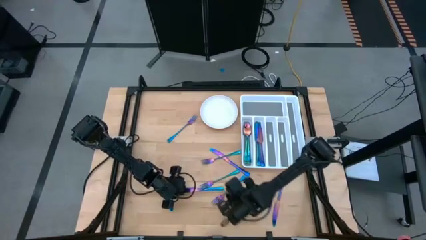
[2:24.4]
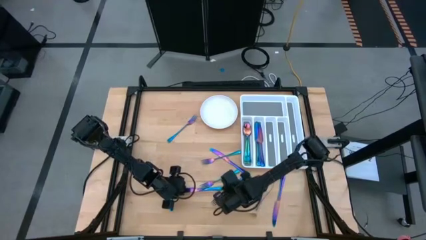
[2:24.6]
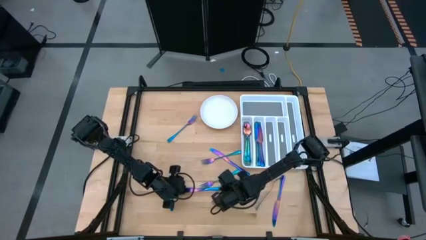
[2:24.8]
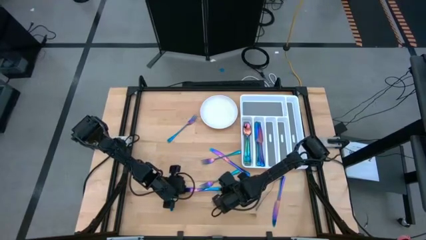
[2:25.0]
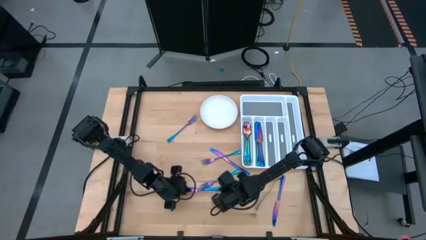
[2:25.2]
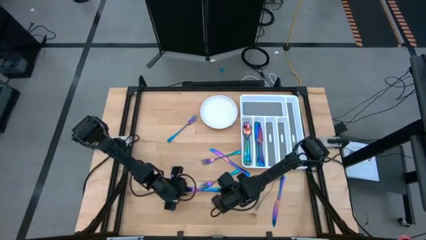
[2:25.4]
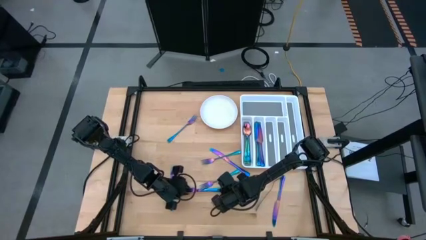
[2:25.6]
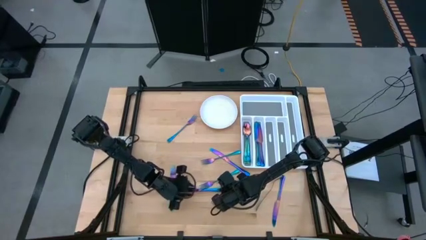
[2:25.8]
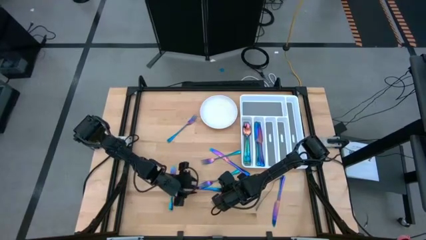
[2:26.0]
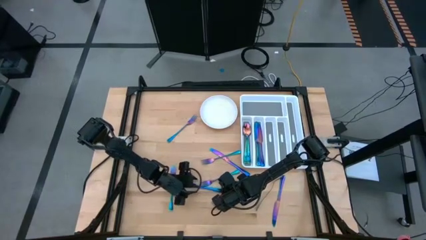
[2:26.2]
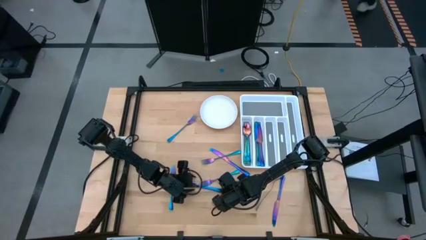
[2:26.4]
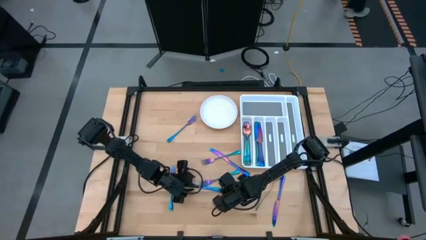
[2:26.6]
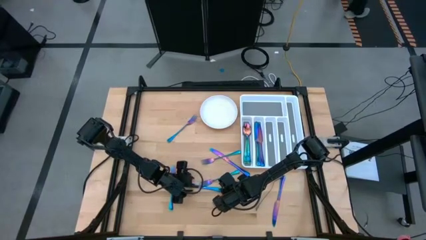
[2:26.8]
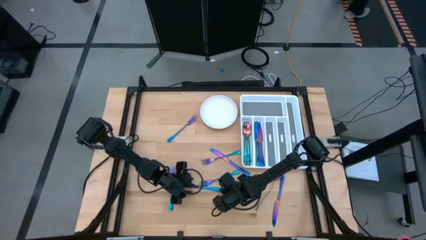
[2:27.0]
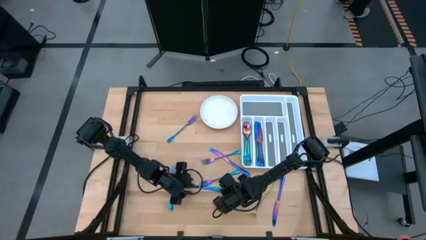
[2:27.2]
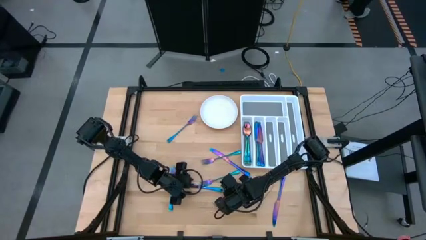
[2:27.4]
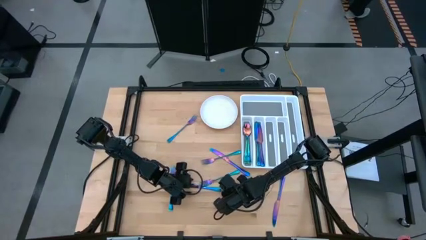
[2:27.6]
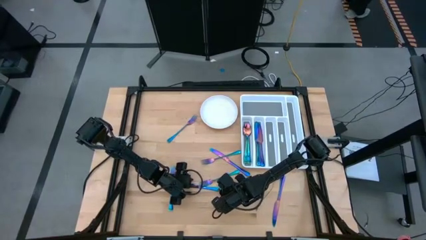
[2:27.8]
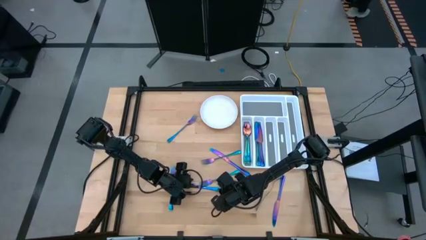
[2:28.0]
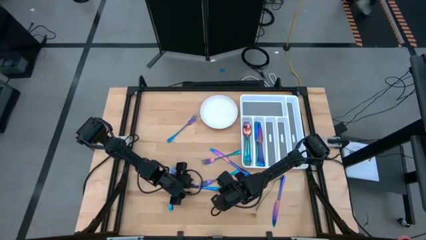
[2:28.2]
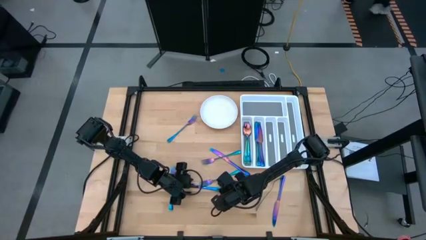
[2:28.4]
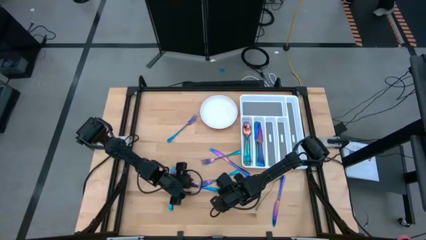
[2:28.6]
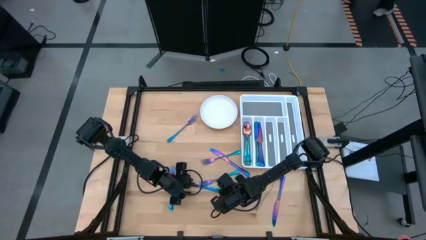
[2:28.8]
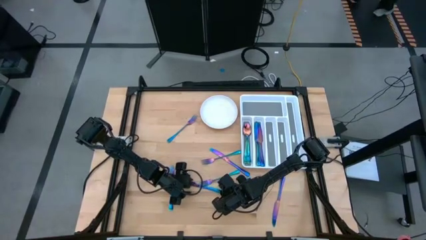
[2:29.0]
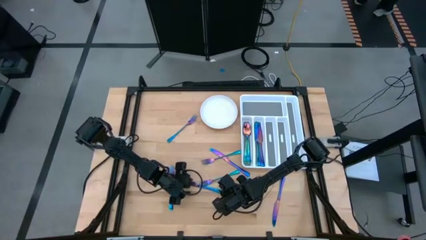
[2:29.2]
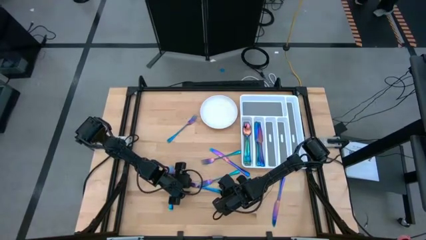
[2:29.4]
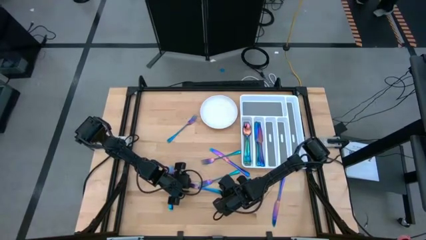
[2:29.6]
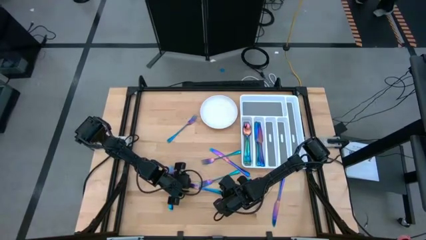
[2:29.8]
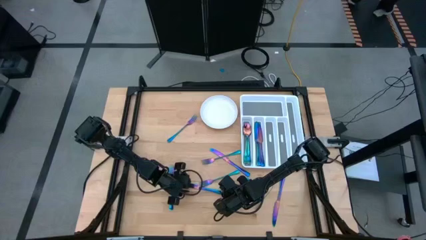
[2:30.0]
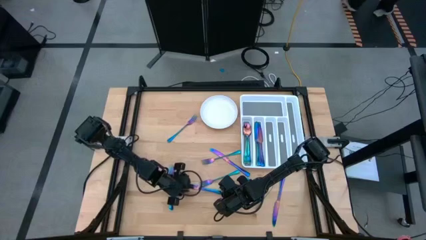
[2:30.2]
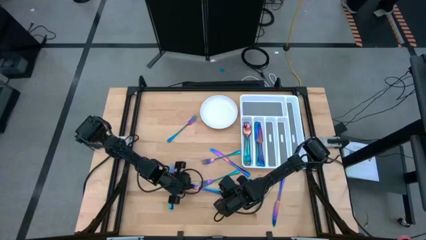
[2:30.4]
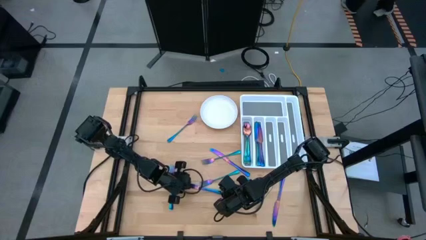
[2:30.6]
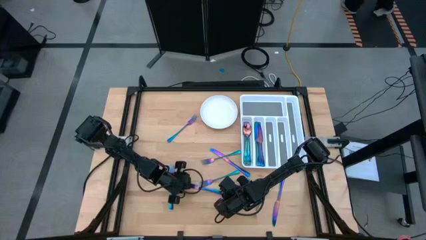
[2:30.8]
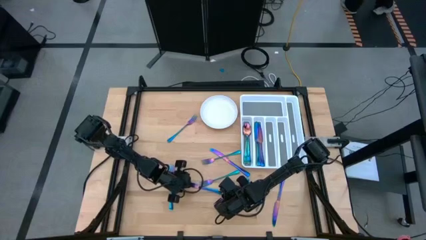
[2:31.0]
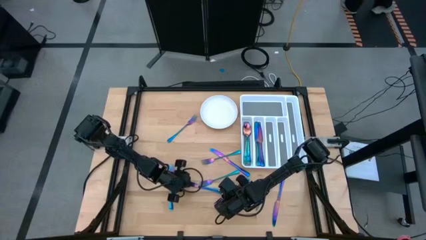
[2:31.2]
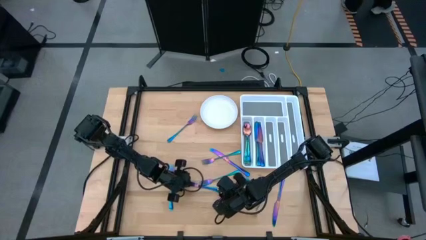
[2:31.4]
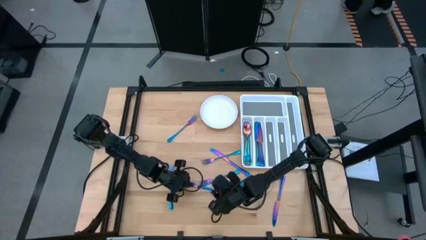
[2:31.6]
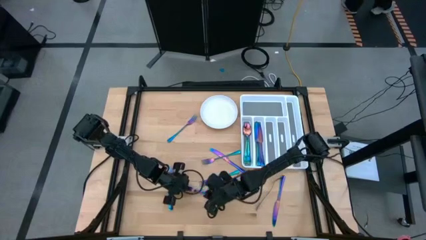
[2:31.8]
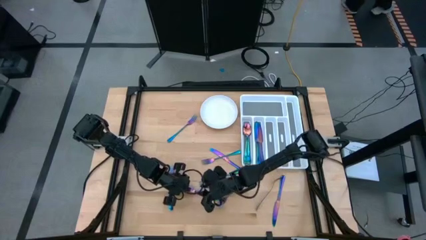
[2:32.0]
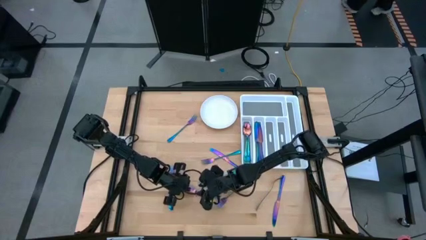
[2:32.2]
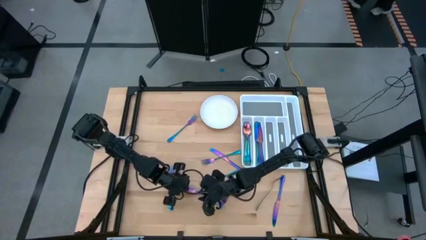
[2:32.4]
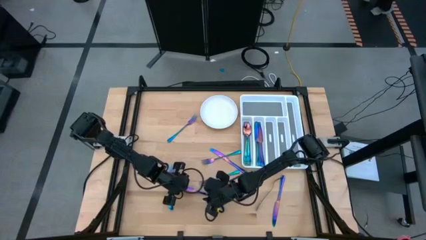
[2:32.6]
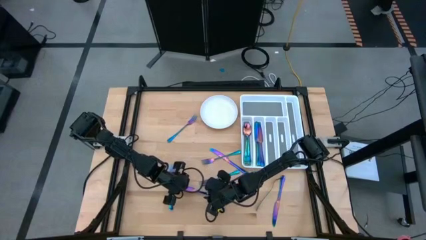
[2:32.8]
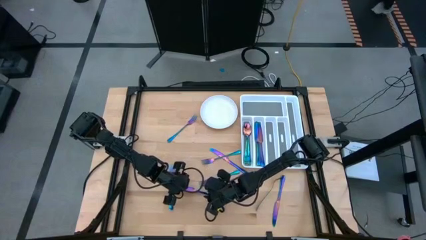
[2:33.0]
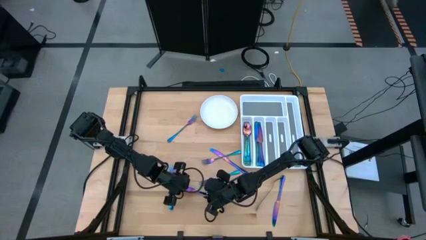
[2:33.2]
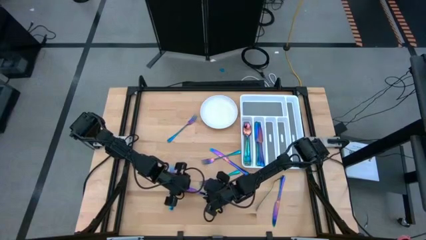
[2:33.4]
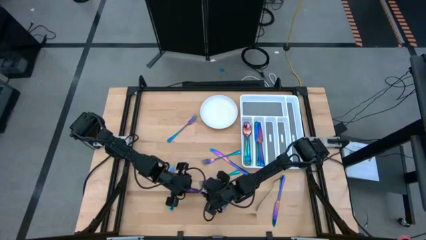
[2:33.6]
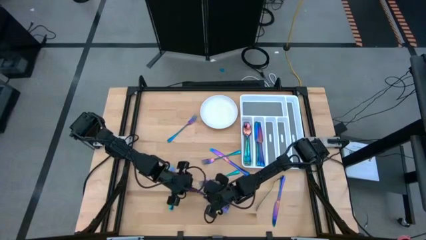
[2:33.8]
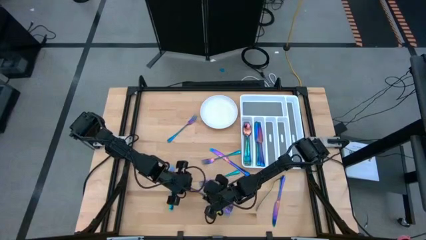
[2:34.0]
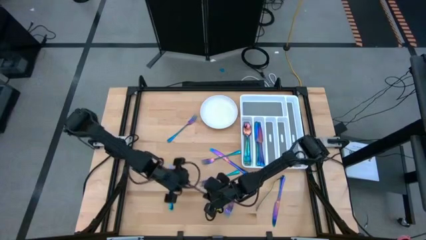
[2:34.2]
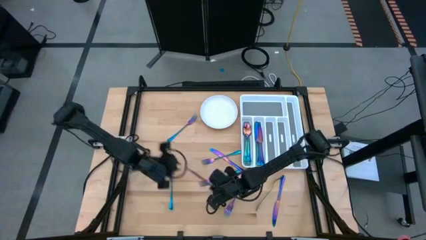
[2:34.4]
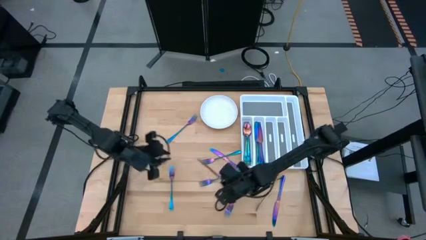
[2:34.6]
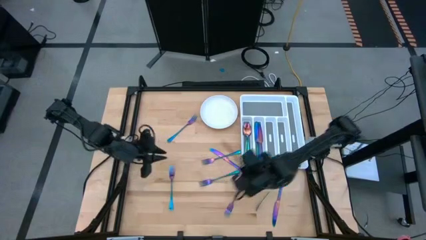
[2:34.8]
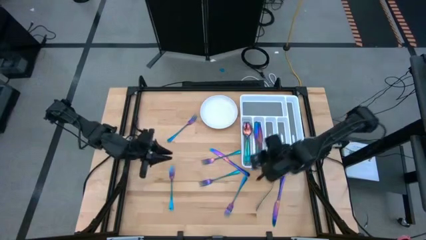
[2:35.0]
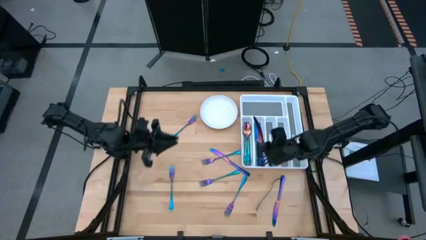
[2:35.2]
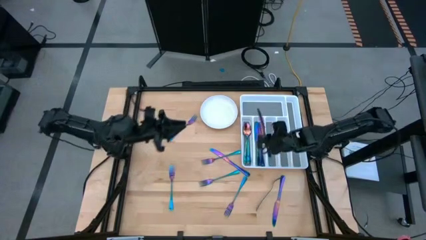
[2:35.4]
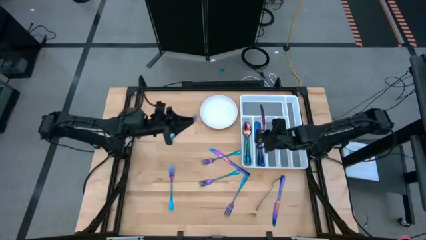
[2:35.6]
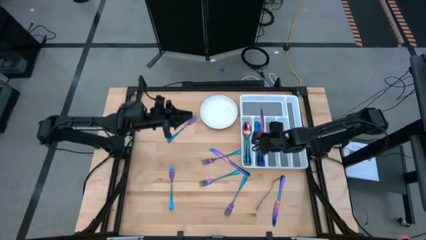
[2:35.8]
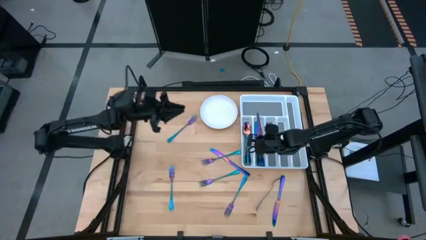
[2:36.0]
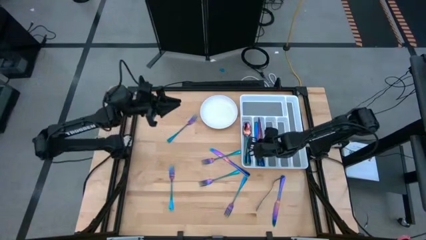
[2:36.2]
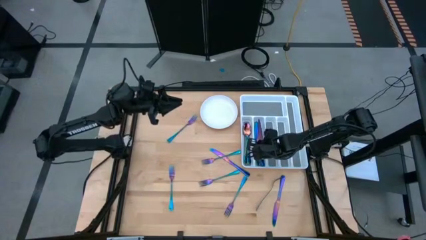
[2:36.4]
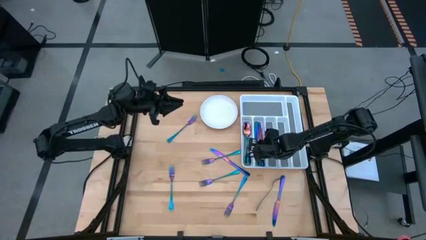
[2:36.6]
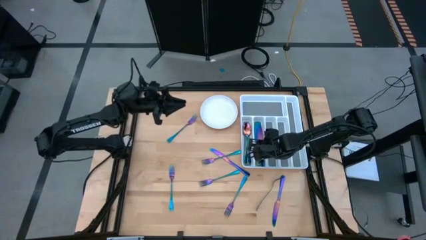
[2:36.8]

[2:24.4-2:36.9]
Task: Sort silverware
Put the purple table knife into the white silverware tray

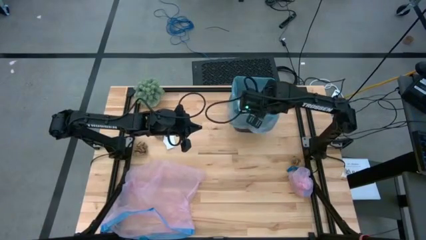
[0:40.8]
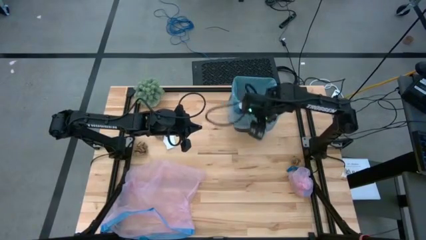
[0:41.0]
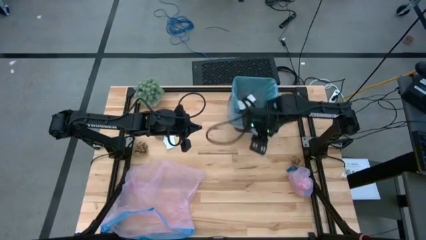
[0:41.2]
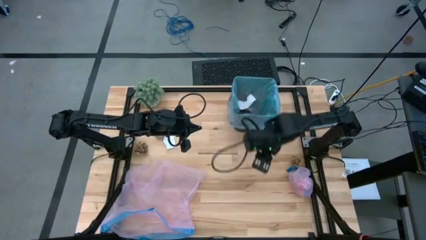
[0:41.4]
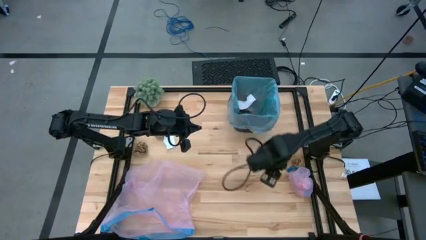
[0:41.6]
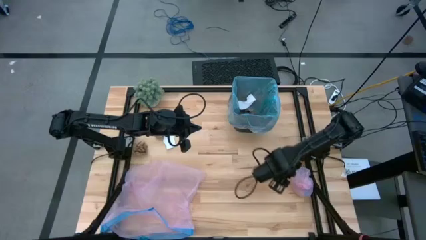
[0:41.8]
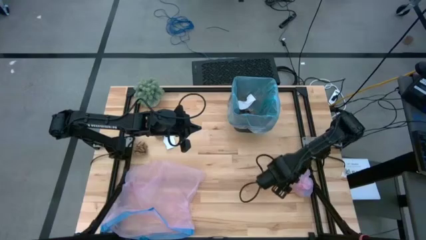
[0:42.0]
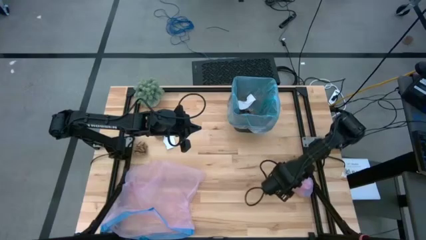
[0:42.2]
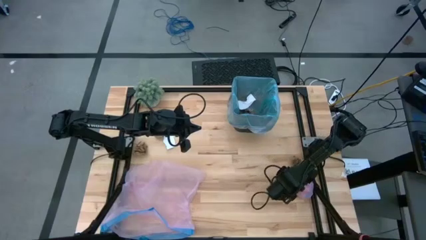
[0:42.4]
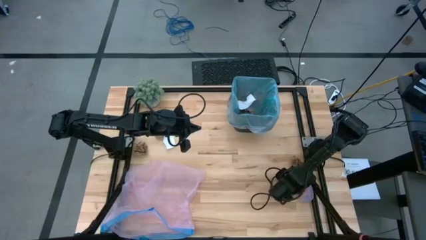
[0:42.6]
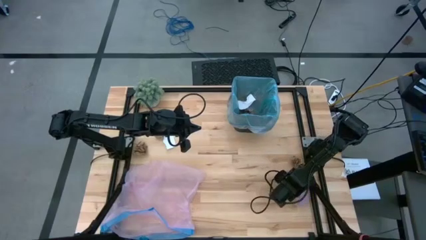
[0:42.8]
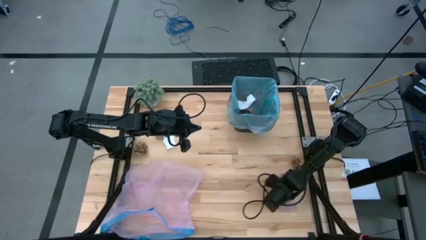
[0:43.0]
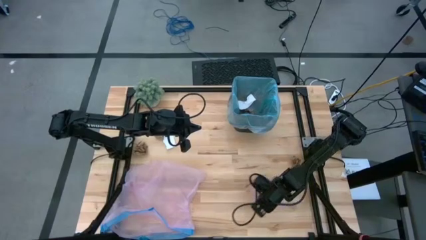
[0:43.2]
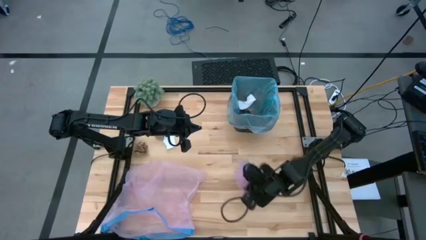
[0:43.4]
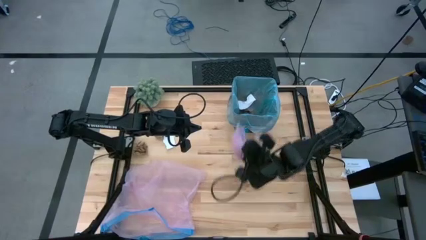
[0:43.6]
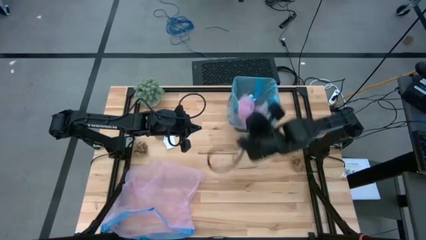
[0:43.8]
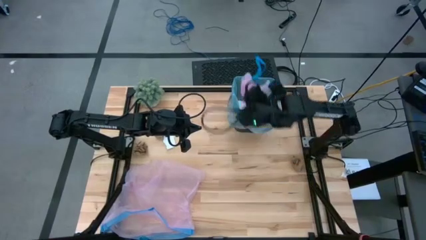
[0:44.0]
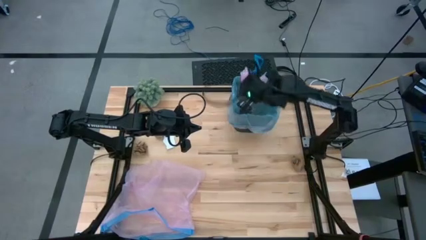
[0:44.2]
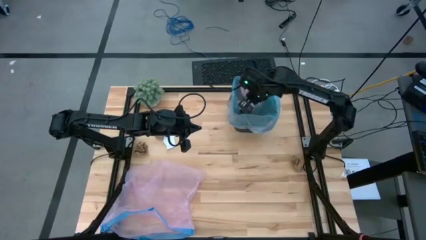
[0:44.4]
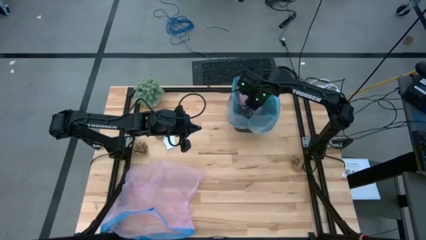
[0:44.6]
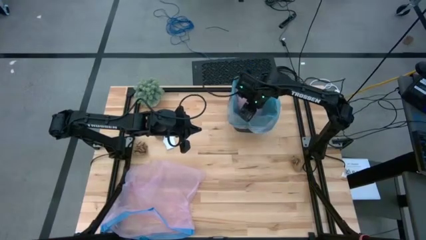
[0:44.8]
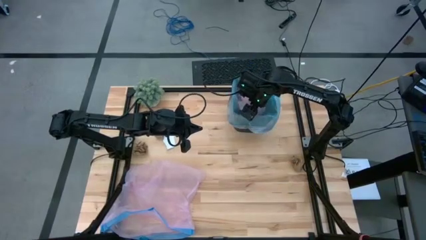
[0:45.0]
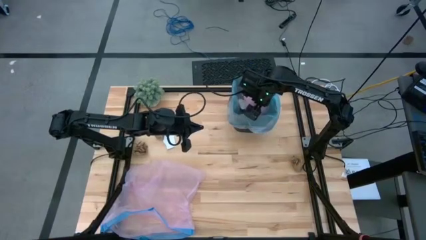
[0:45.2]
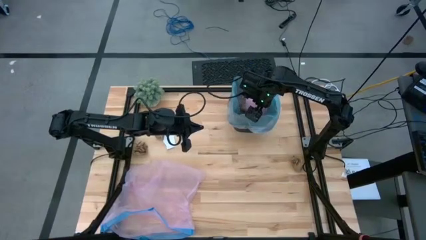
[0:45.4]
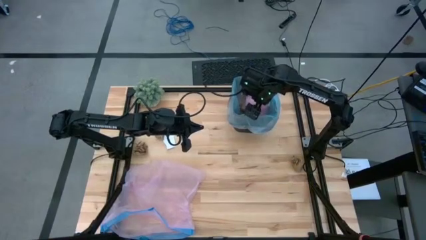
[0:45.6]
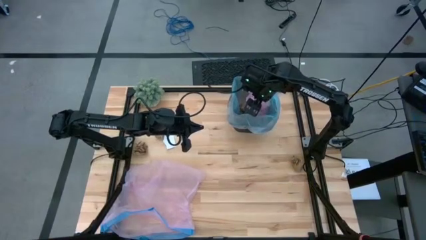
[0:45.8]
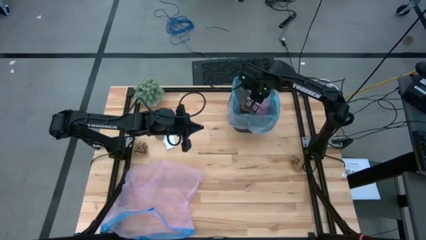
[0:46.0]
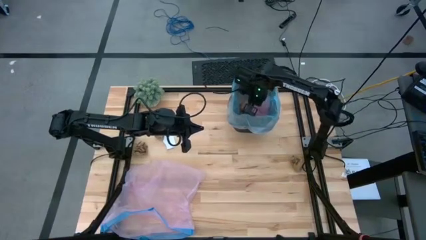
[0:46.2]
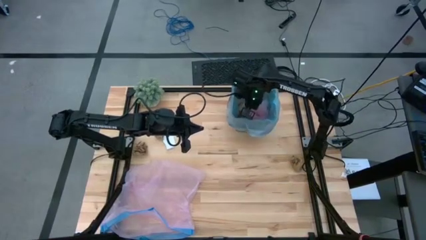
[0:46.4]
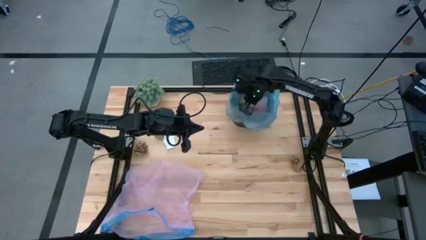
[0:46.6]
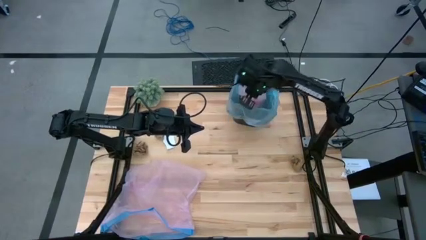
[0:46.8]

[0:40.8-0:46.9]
Task: place trash/remove bag and relplace
Put the pink trash bag into the trash bin
